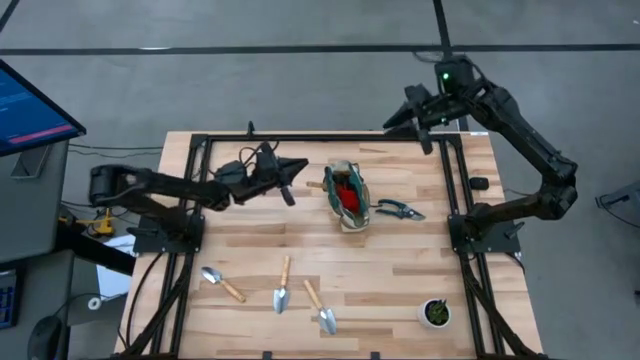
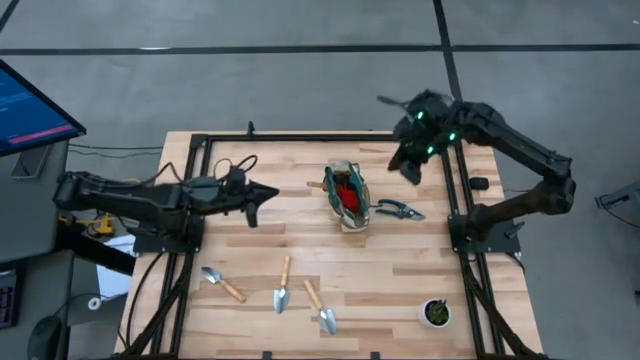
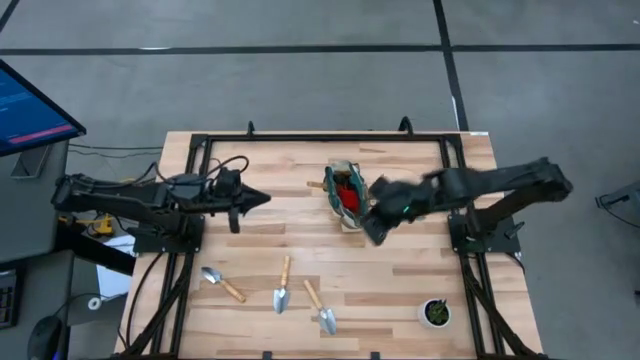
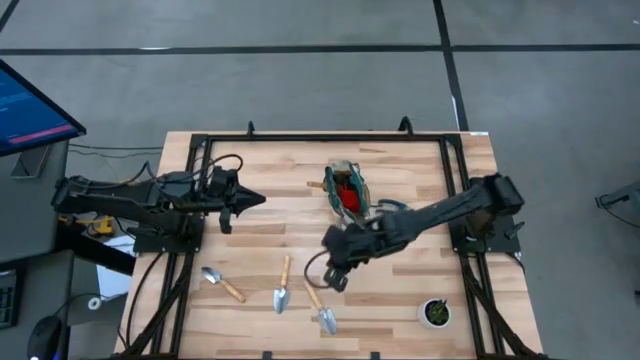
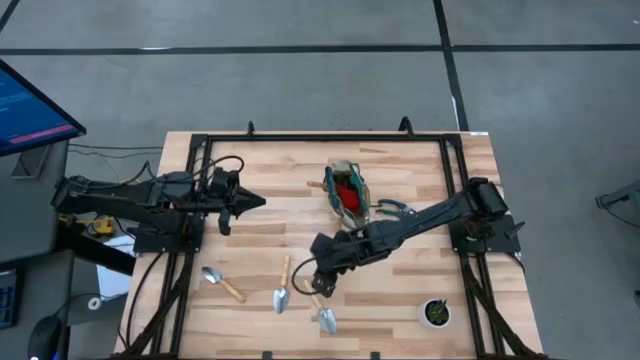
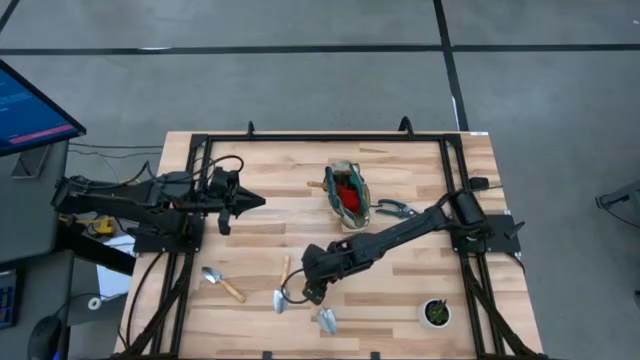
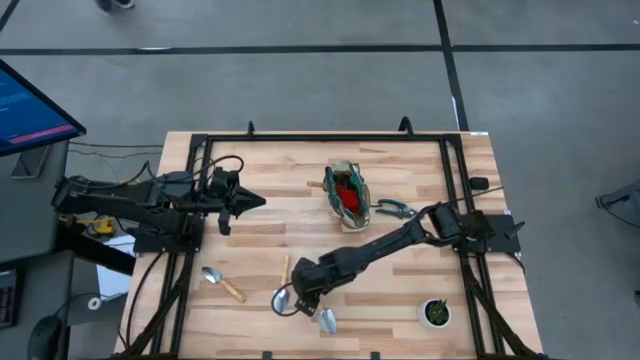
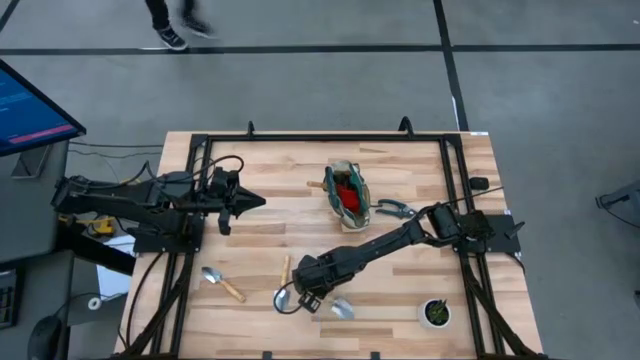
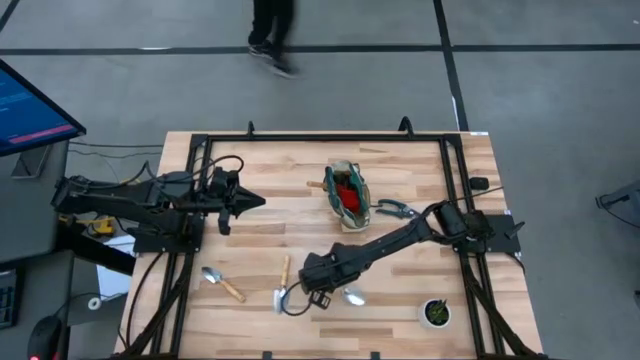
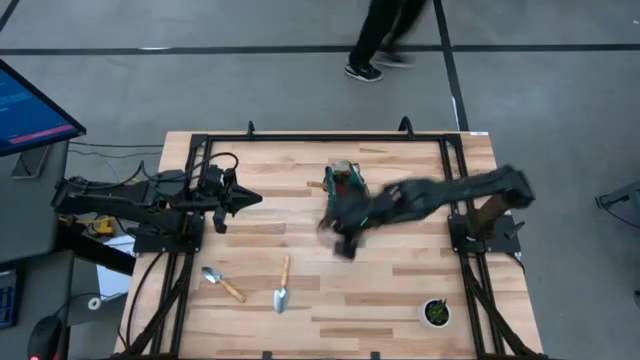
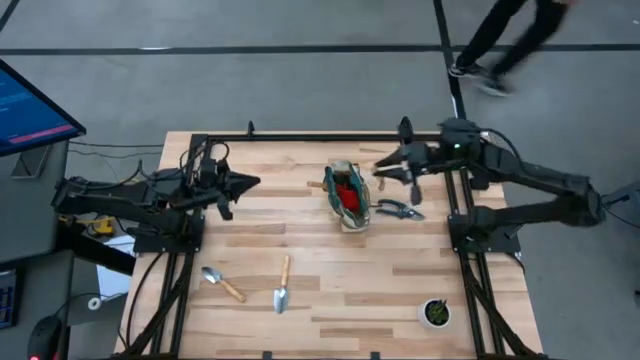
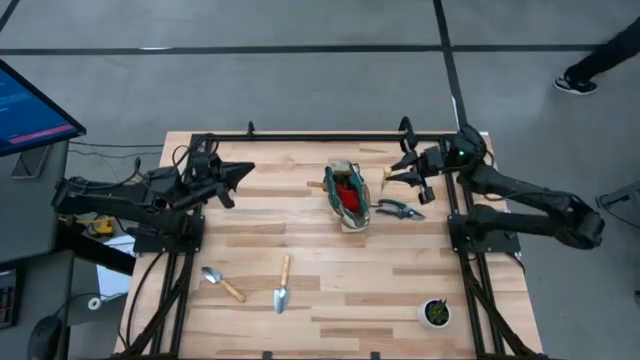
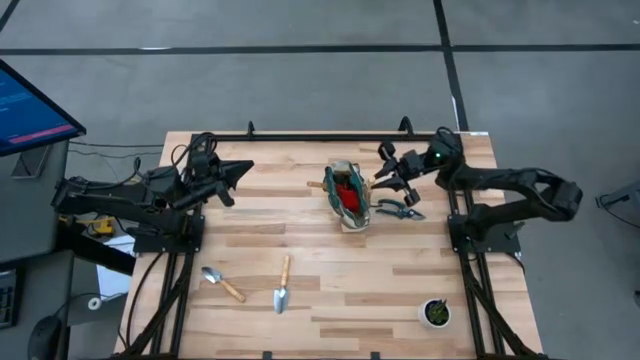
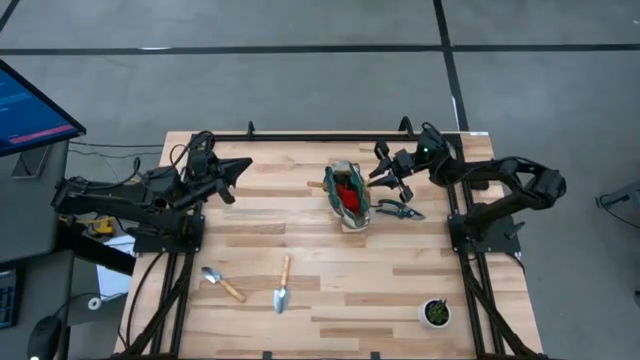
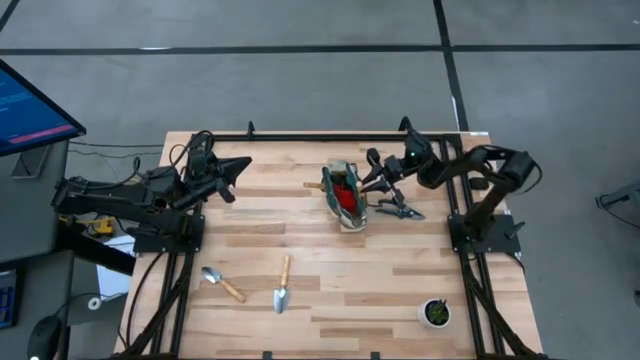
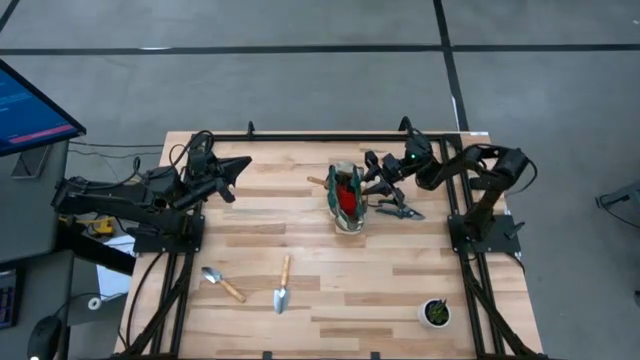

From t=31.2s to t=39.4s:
Task: Pick & Place Garden tools in Gardening bag
Put the trowel into the gardening bag

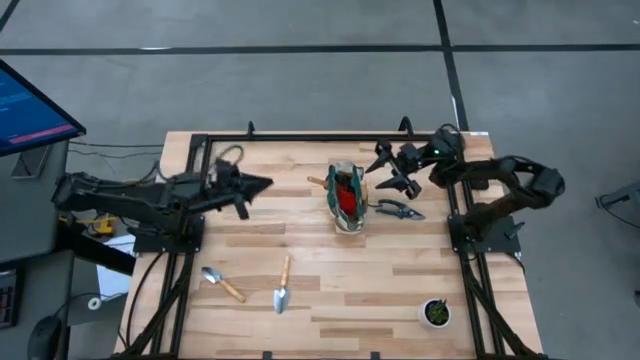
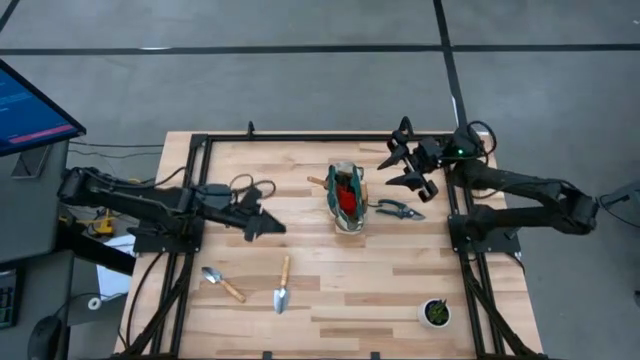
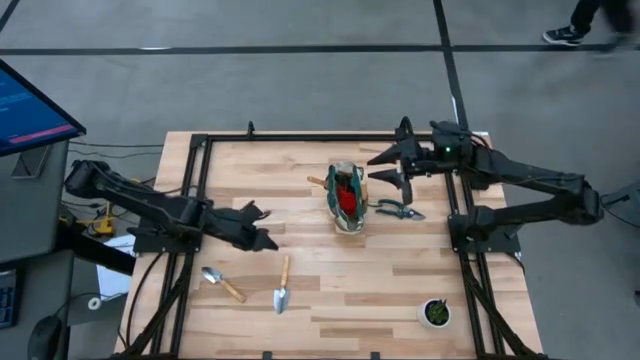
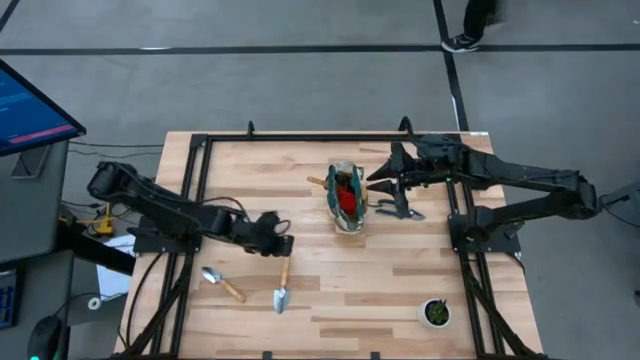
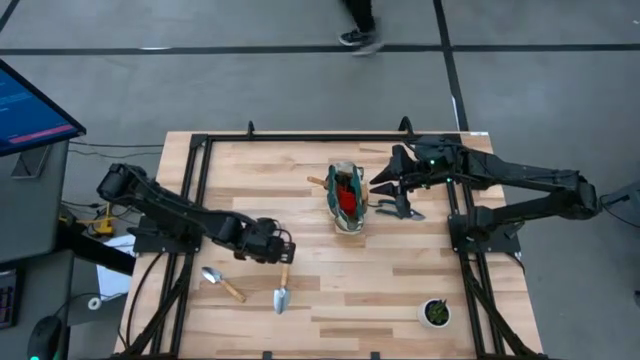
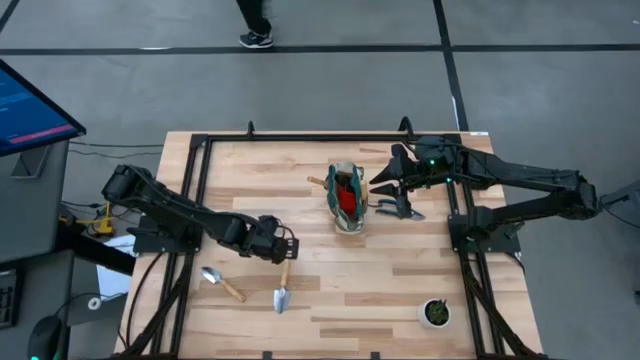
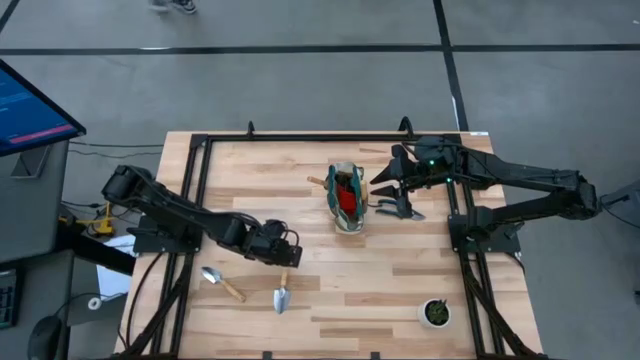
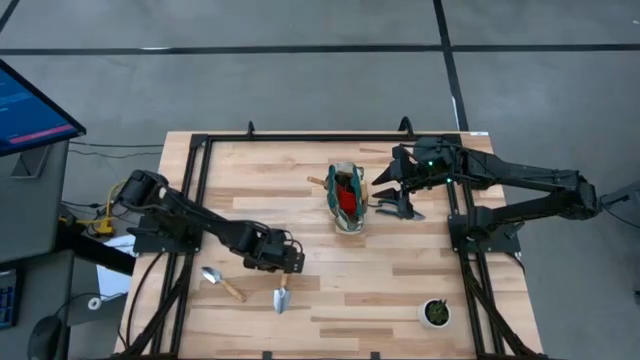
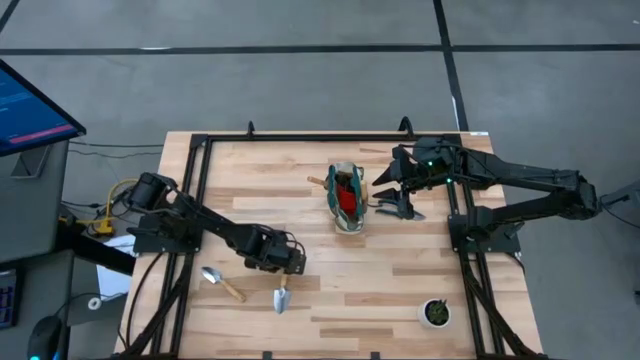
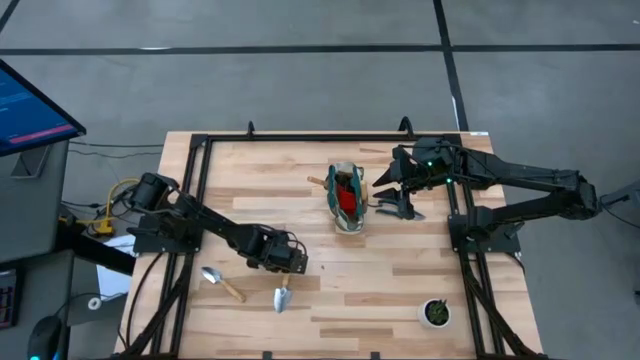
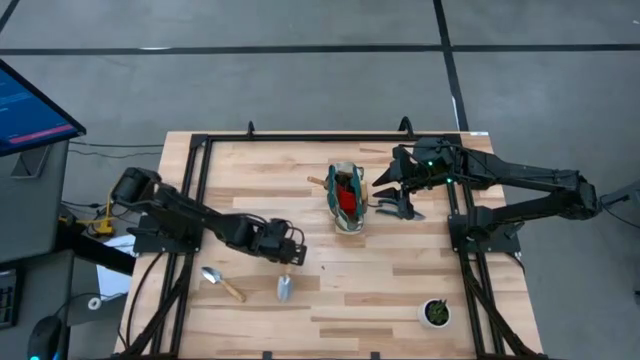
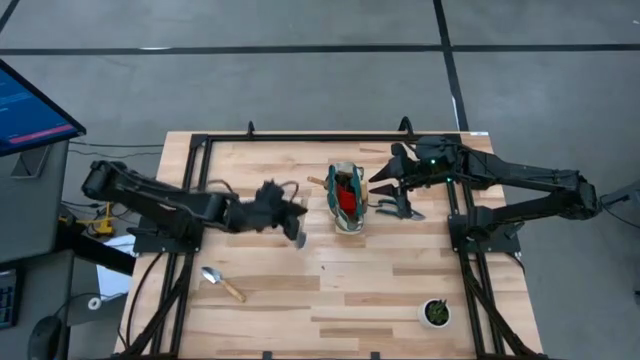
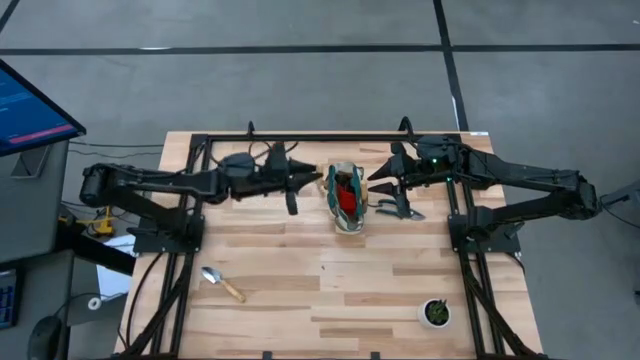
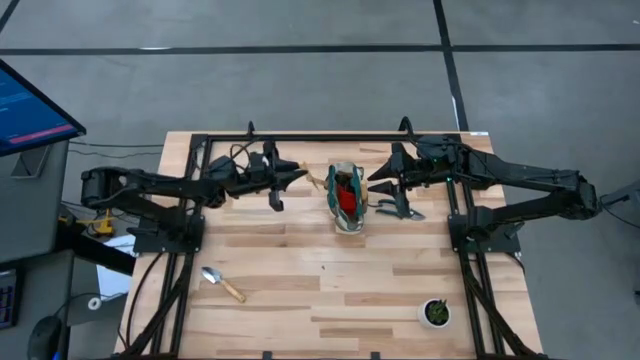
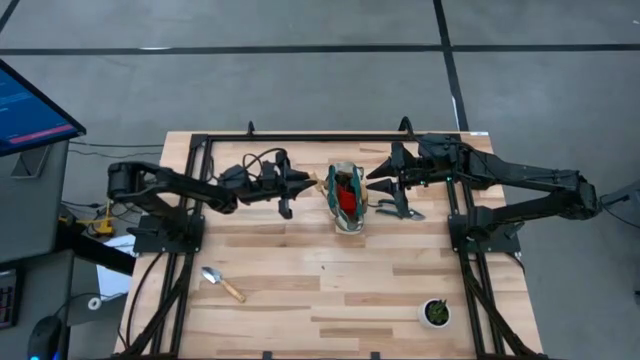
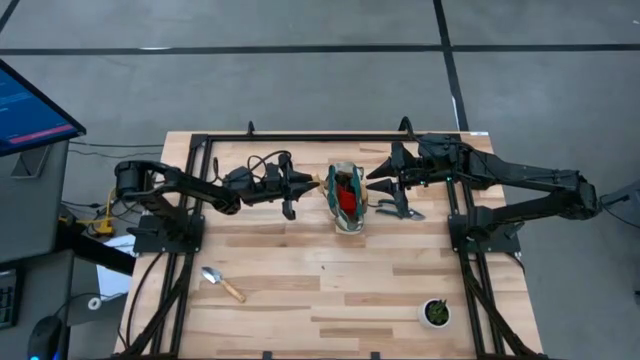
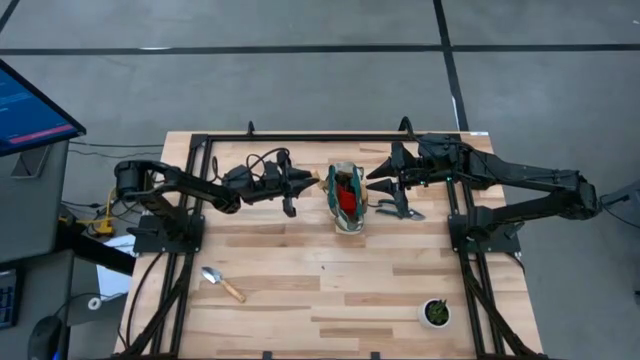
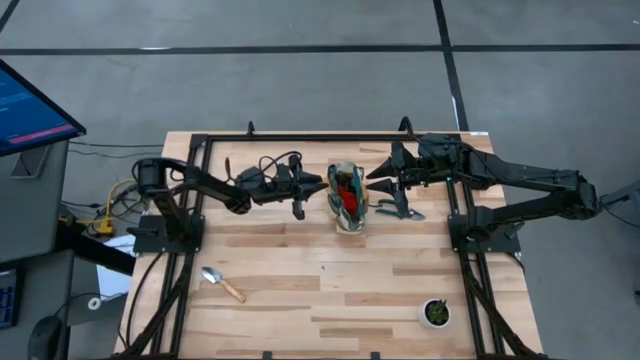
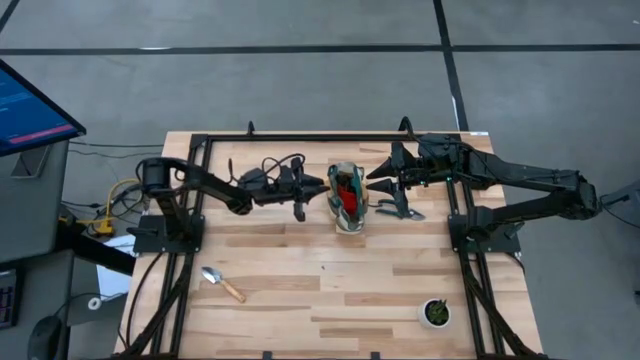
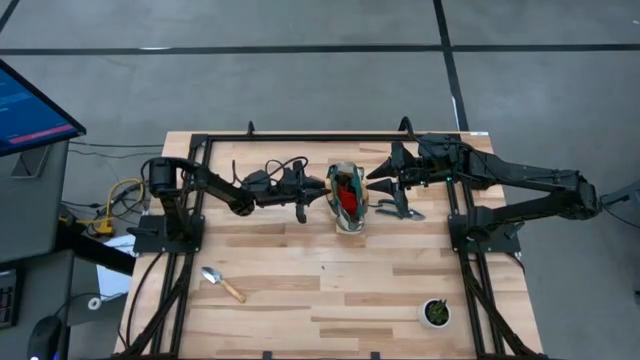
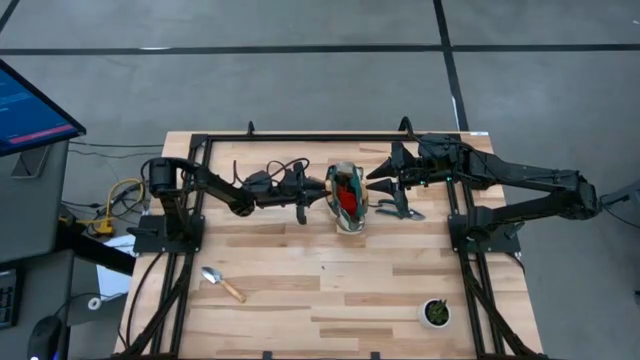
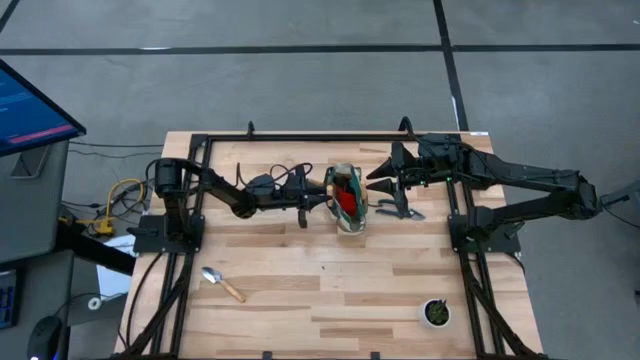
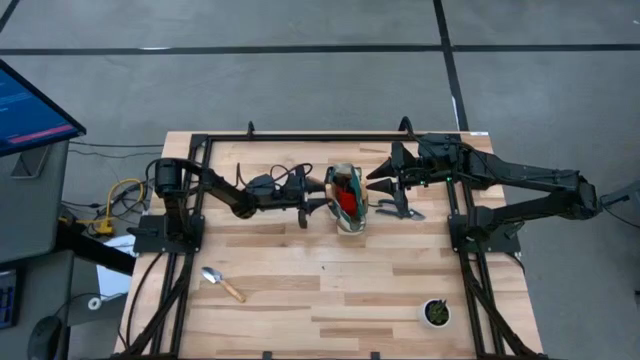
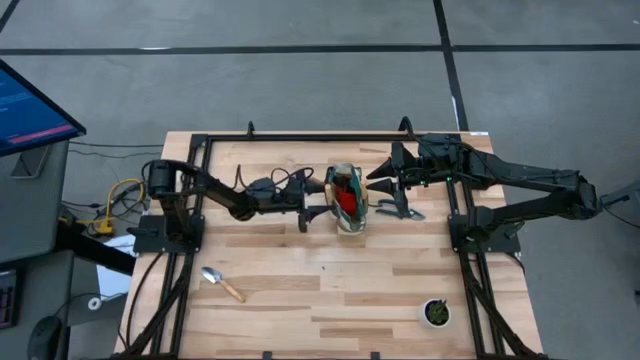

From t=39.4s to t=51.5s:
Put the trowel into the gardening bag
